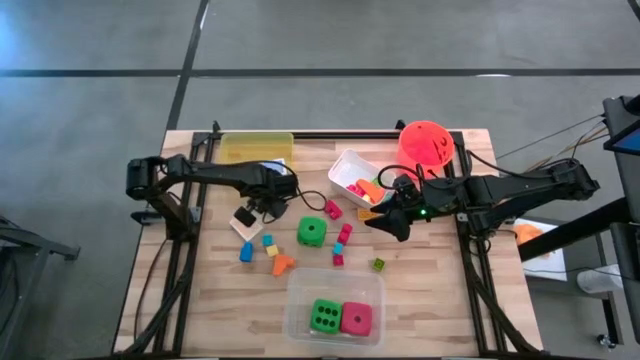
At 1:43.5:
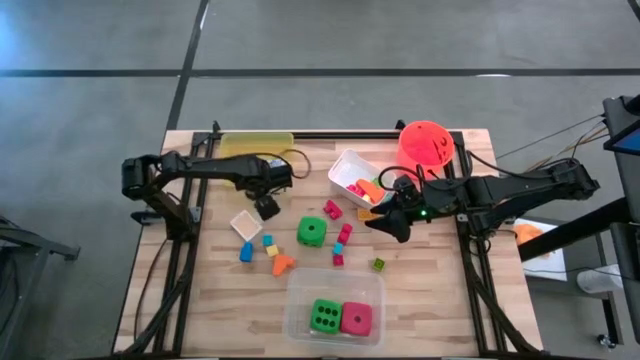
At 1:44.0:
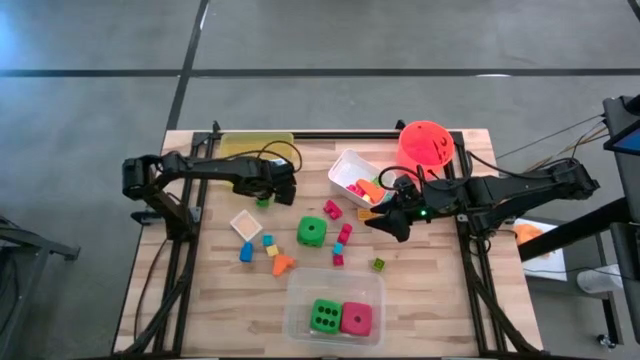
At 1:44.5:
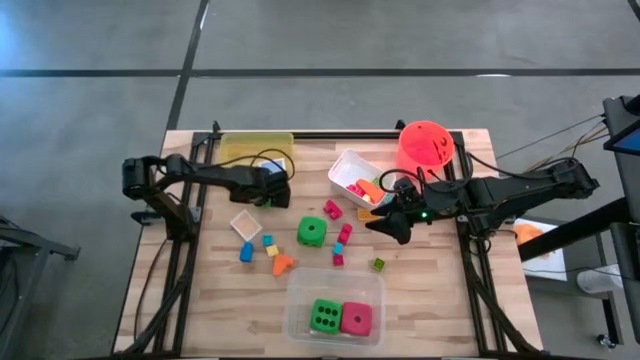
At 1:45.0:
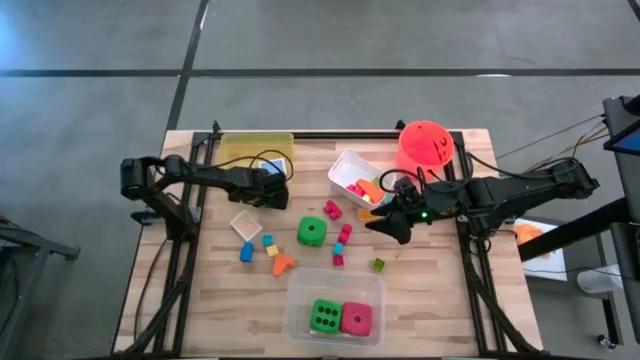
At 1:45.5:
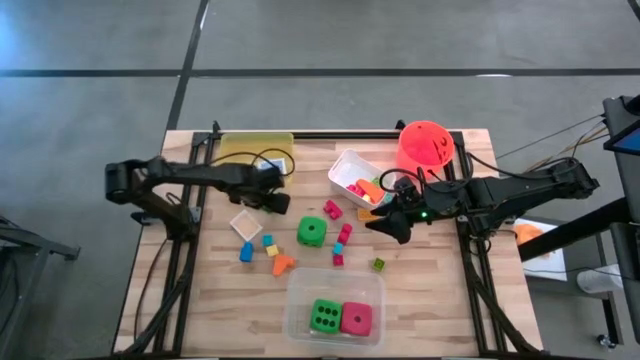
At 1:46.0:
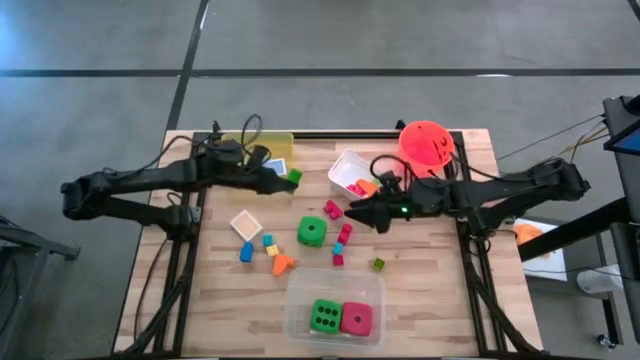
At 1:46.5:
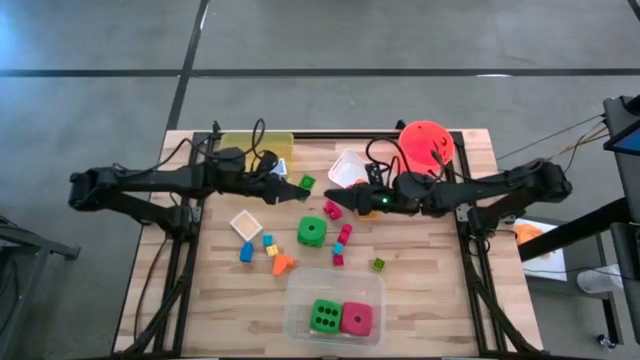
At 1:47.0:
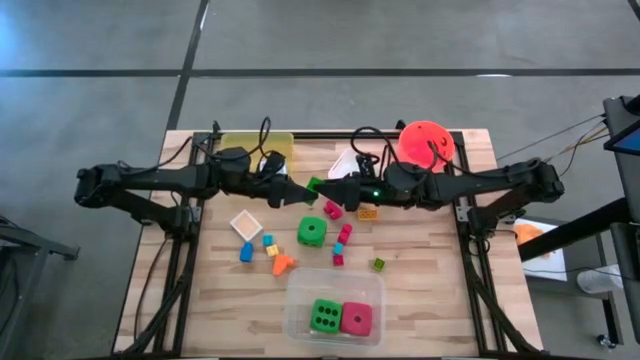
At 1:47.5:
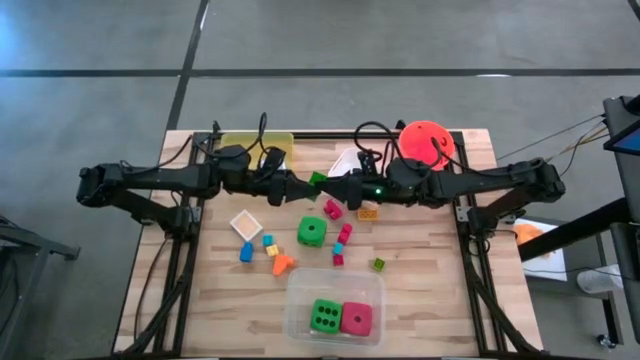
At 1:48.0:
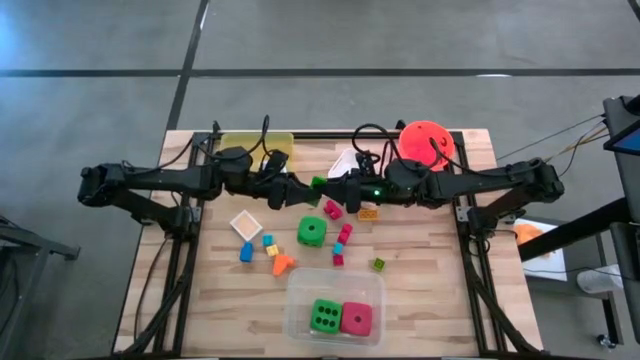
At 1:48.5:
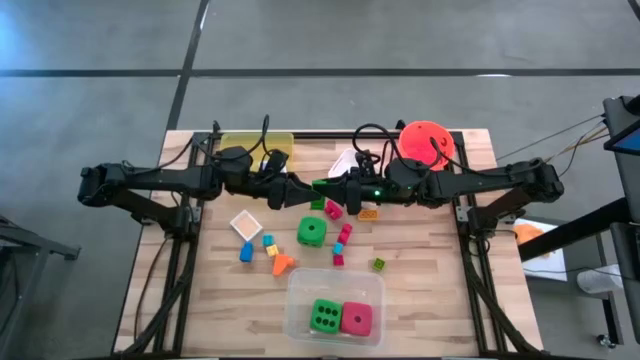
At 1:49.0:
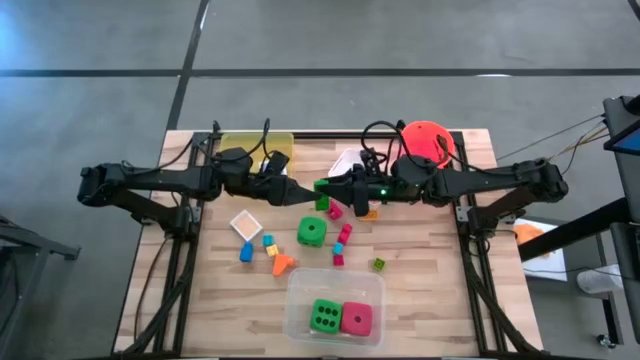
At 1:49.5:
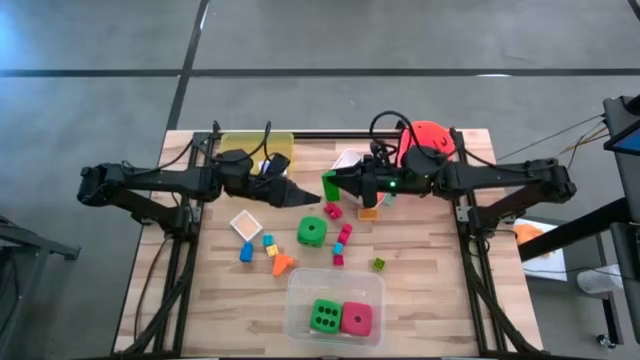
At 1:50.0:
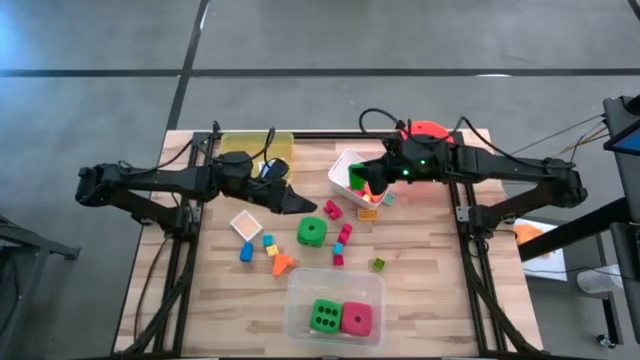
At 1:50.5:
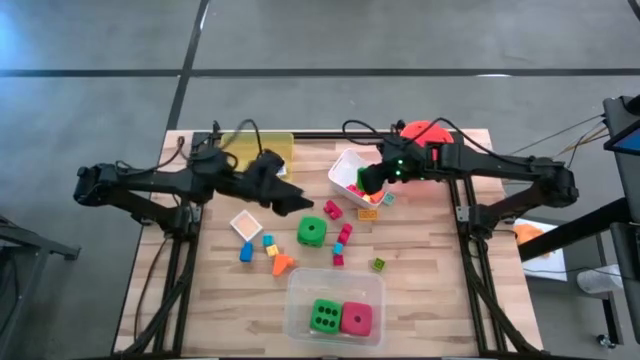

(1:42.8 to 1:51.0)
Task: Pick & Place Toys
Put the green game piece into the white bin

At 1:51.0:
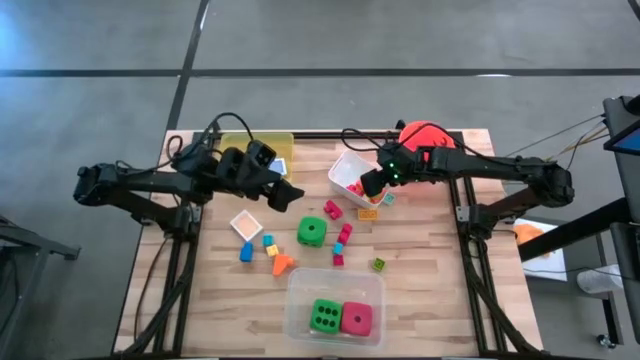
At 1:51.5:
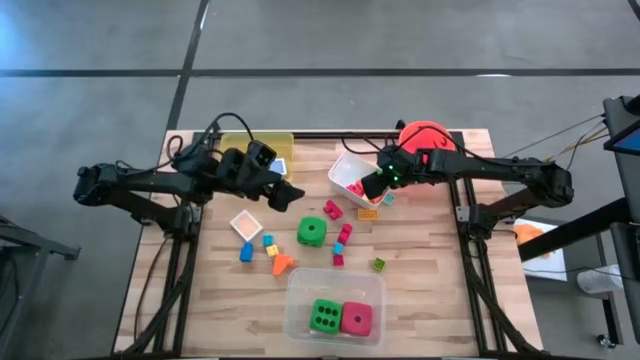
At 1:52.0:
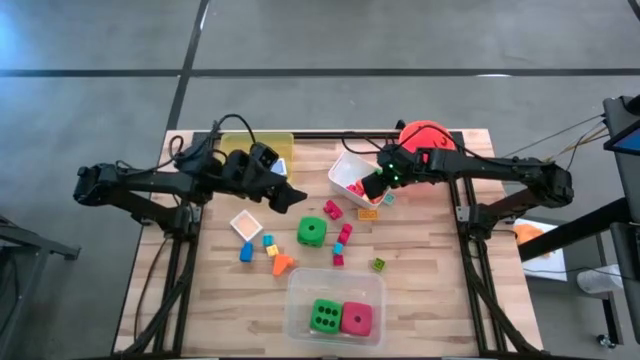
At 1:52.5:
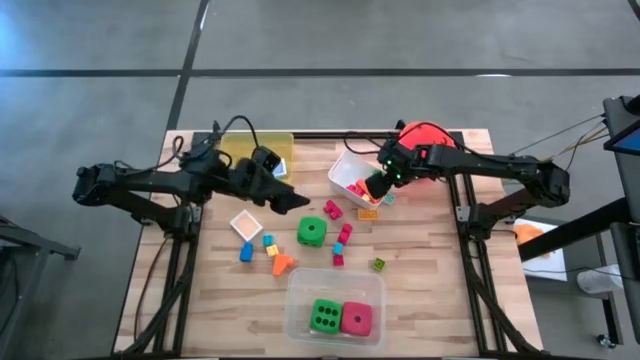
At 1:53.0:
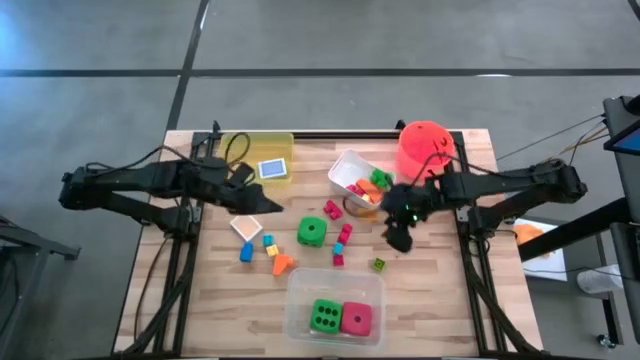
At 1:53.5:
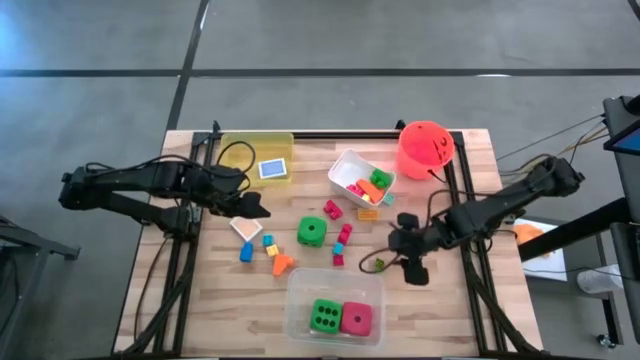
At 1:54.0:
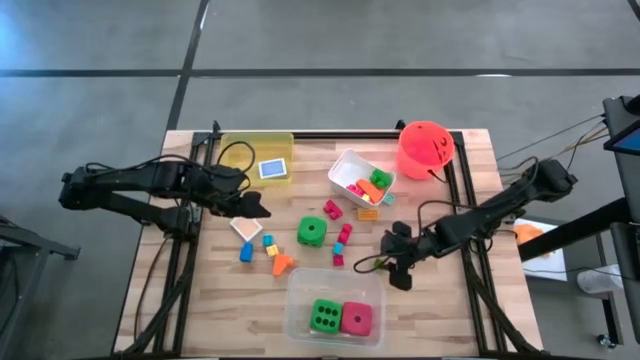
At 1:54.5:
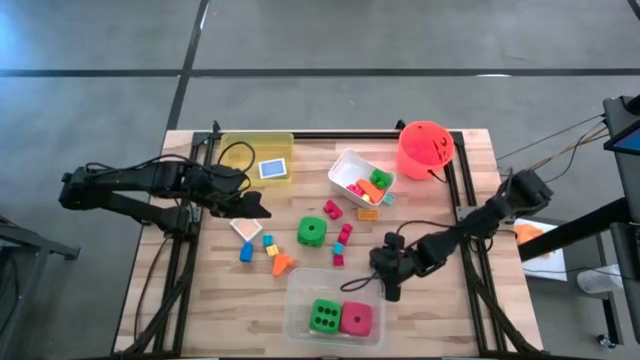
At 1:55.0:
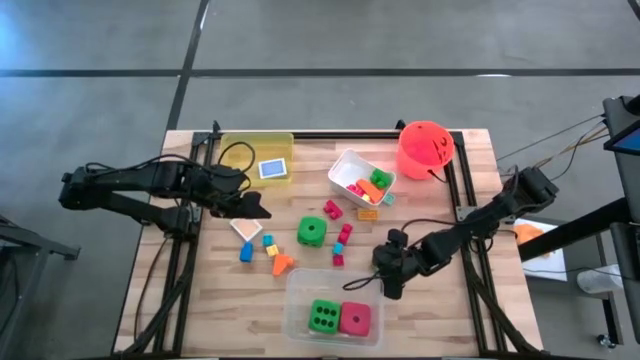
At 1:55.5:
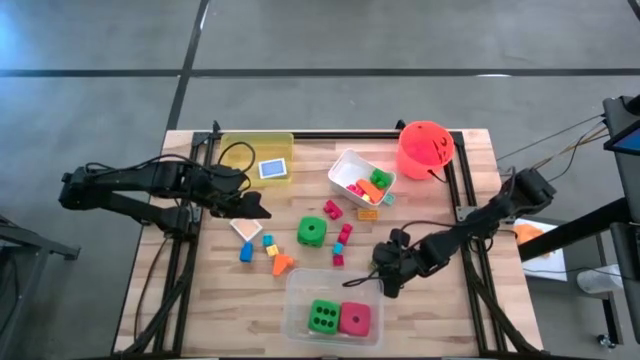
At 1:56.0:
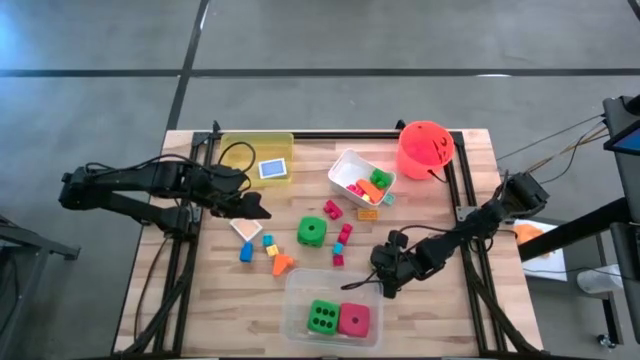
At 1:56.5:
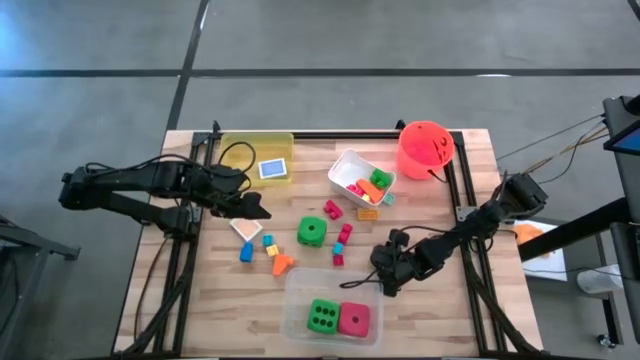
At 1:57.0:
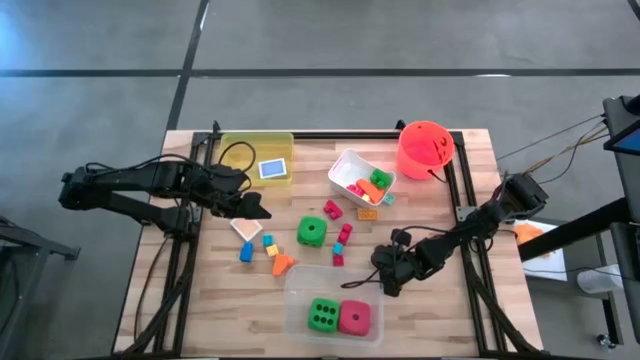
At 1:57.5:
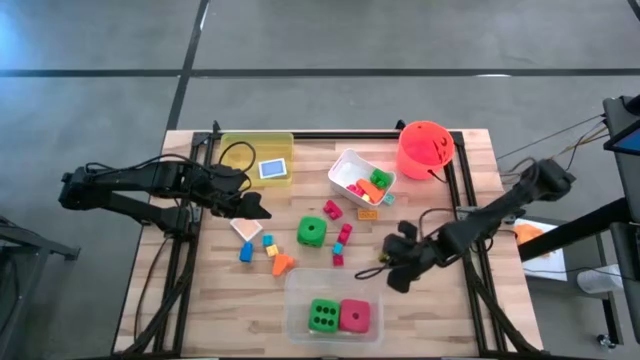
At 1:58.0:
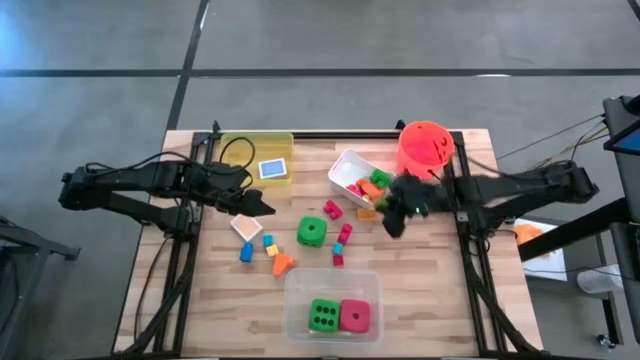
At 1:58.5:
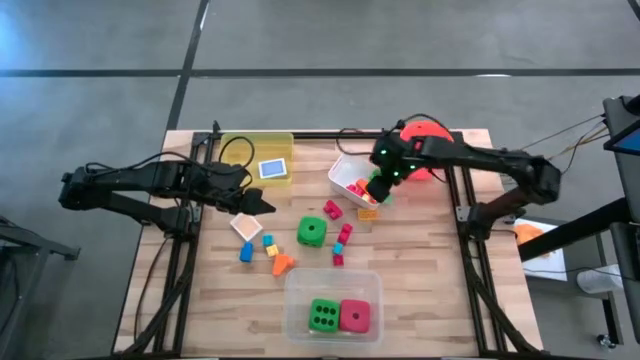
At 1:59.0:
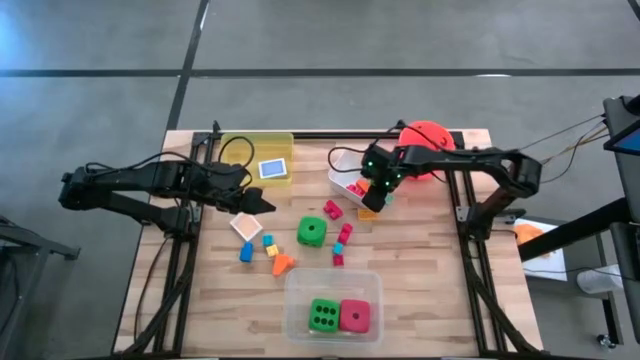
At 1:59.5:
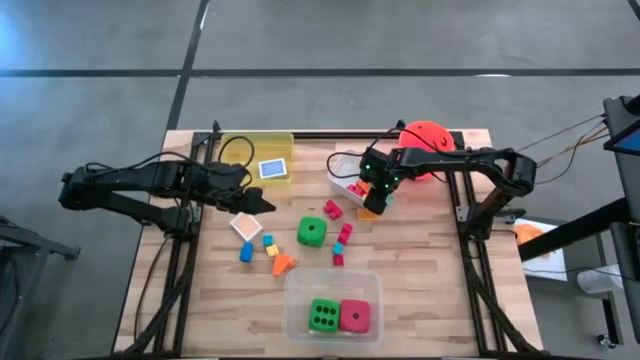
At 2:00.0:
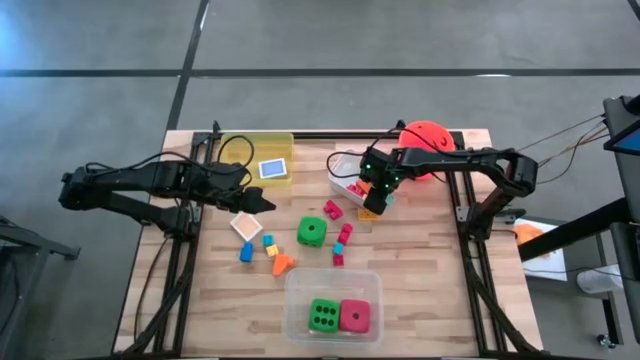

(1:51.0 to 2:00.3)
Put the light green game piece into the white bin

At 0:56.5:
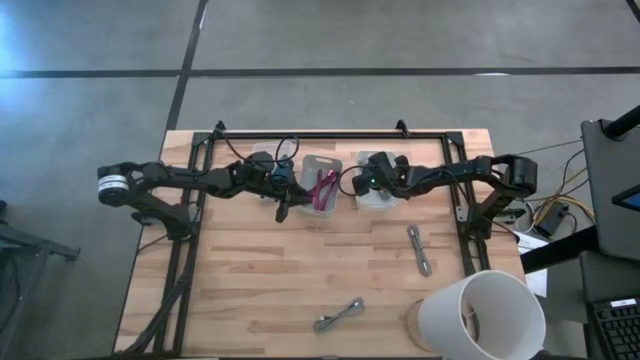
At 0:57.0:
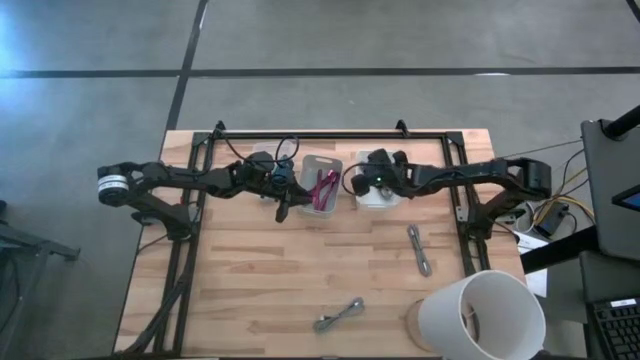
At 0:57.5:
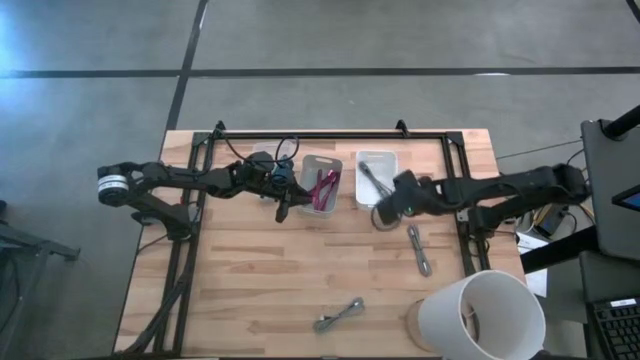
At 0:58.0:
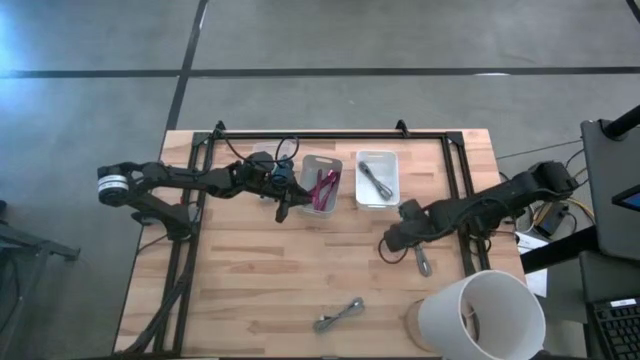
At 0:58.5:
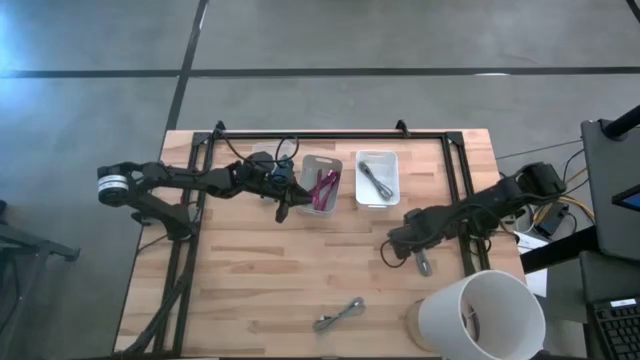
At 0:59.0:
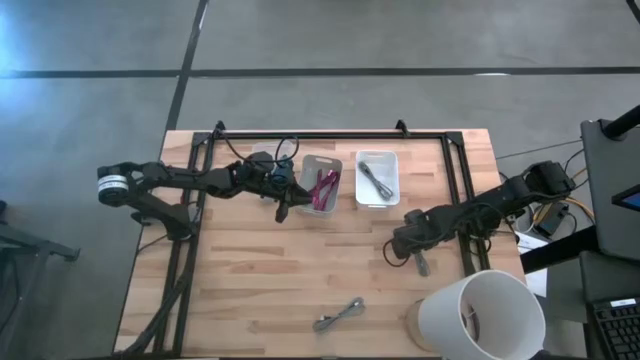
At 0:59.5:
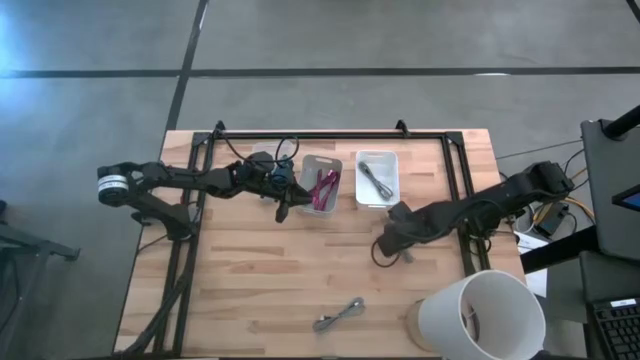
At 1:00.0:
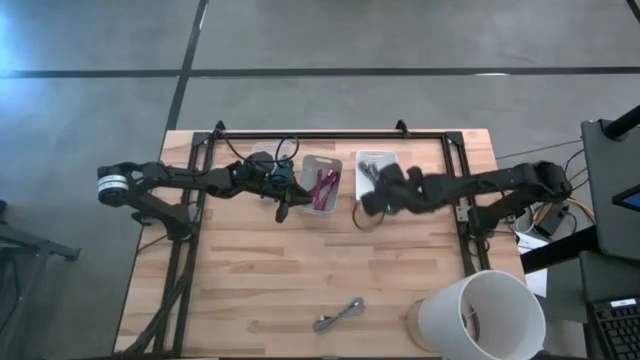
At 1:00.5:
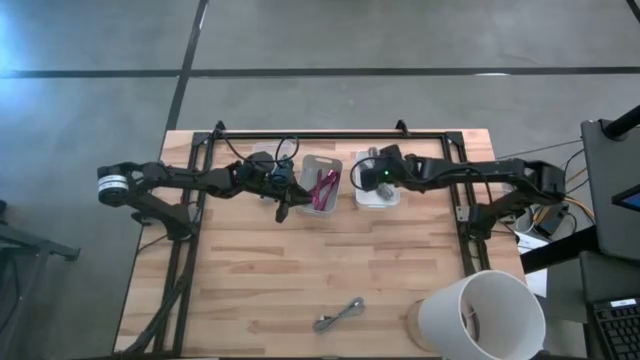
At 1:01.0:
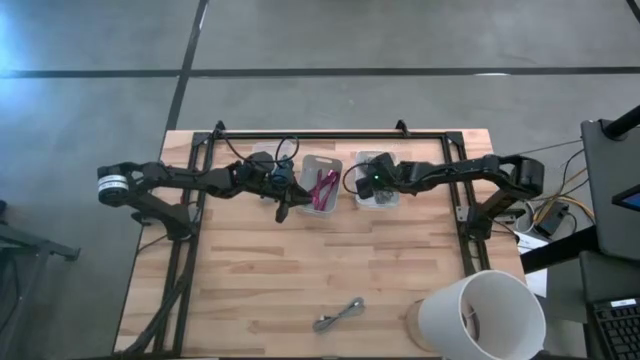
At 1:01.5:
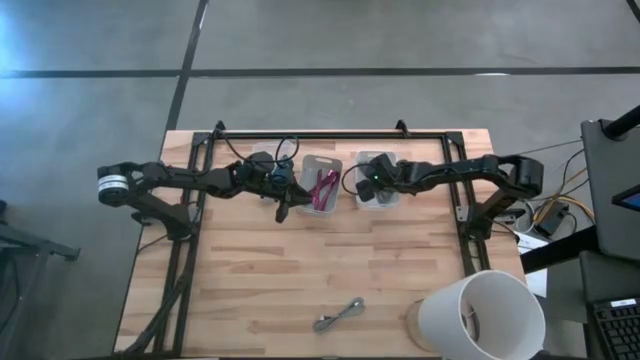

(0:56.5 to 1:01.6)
Task: Pick & Place USB Port
Put the top white charger cable into the white bin
